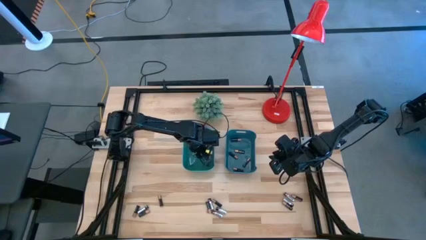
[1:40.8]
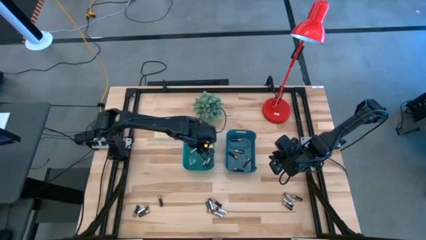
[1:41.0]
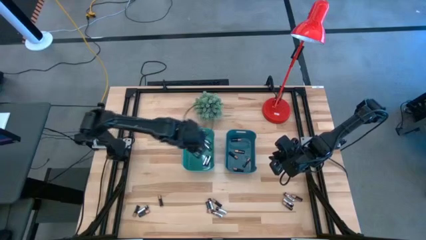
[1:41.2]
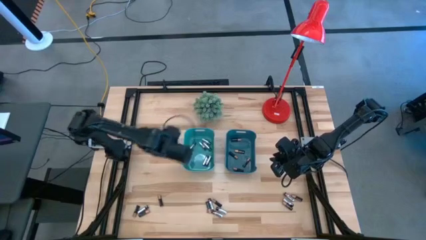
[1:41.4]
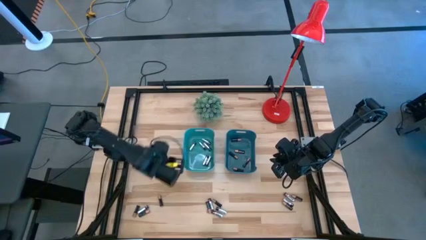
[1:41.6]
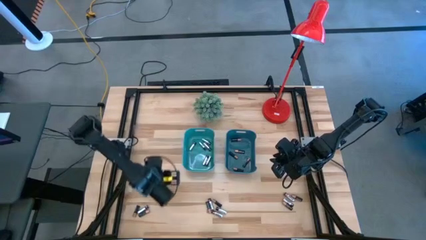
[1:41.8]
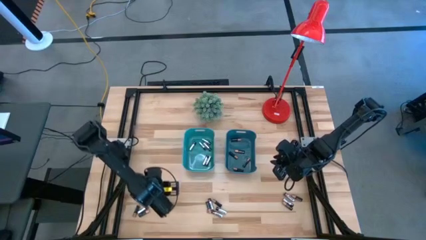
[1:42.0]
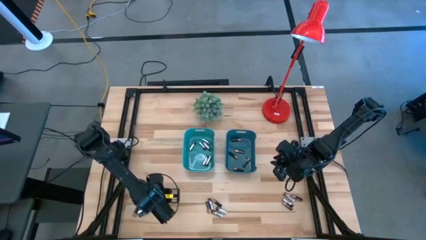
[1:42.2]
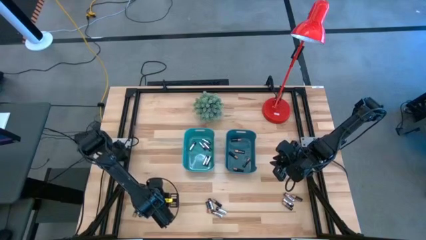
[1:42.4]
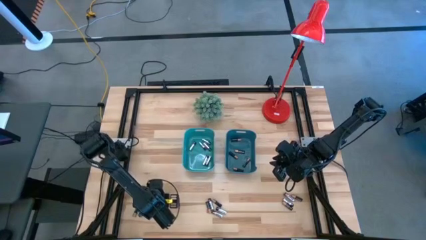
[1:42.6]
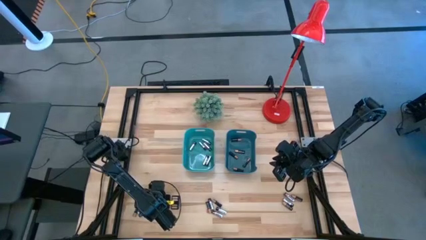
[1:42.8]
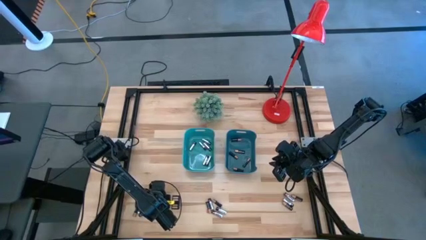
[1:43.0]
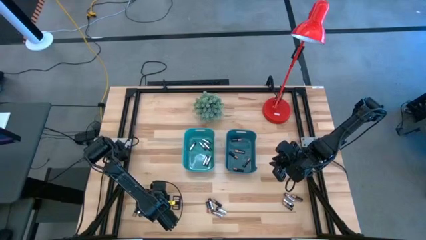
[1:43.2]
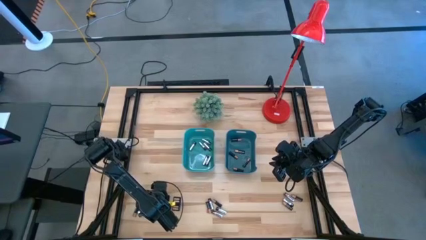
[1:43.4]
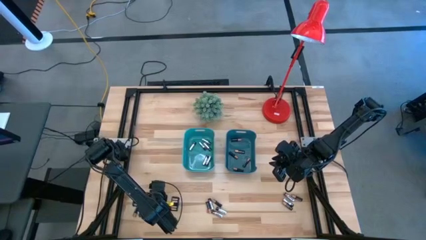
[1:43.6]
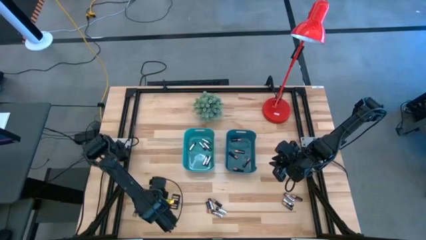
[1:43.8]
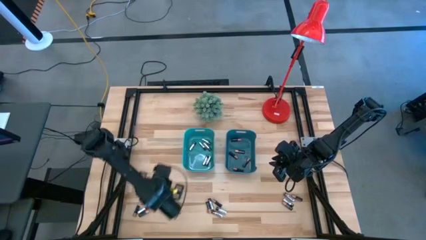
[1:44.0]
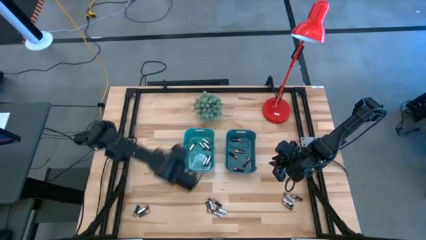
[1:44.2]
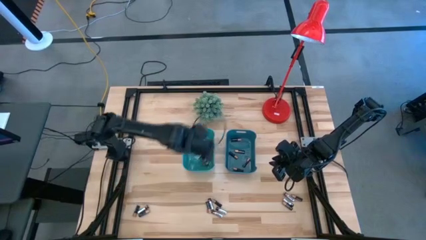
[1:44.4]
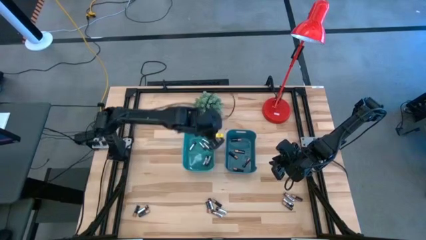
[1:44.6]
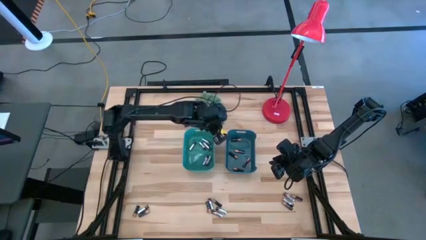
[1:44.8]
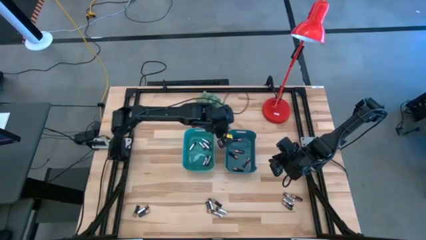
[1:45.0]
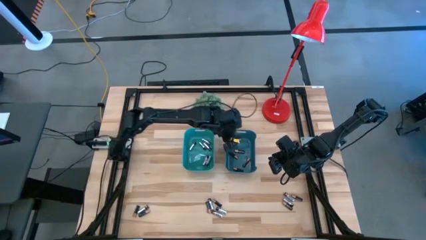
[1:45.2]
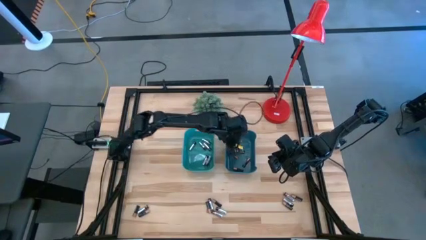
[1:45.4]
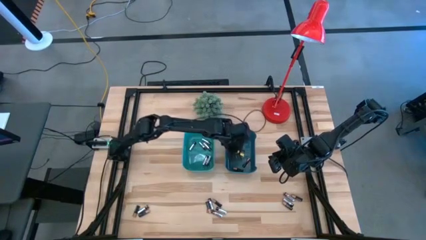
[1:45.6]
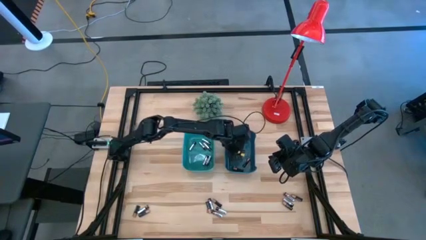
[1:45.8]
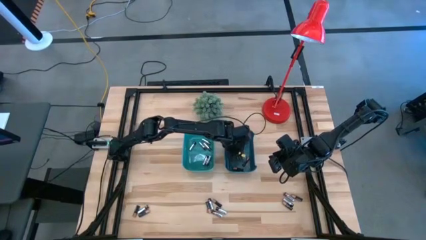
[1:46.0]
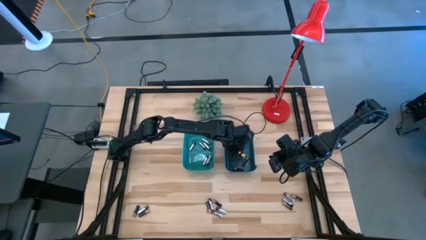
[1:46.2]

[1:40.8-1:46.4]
Task: Sort batteries
Put the black battery into the blue bin

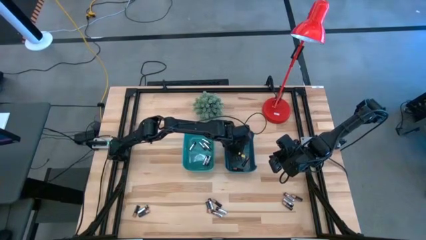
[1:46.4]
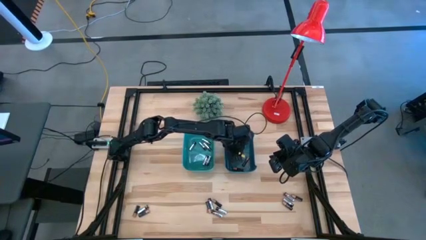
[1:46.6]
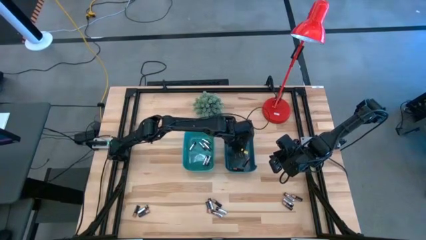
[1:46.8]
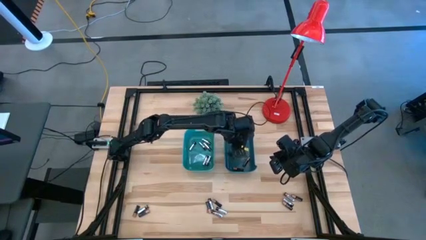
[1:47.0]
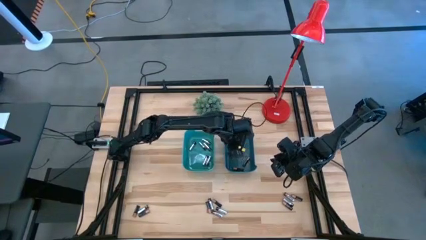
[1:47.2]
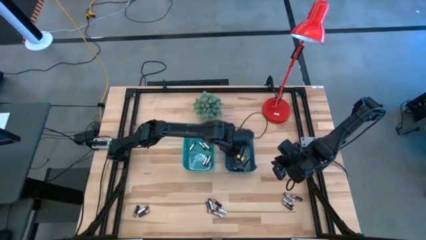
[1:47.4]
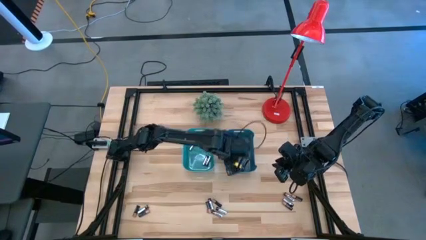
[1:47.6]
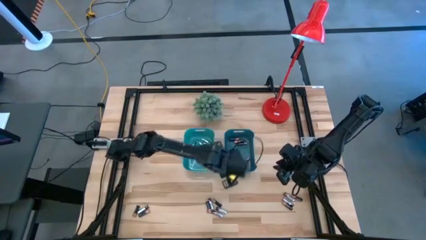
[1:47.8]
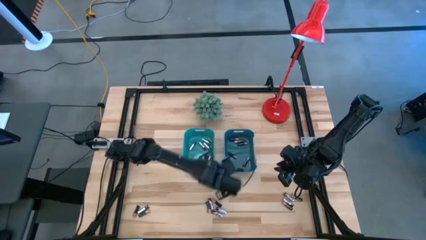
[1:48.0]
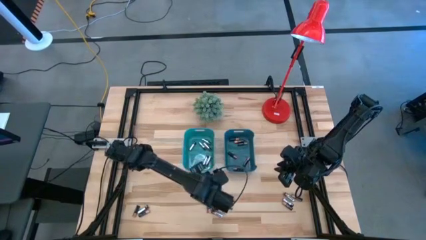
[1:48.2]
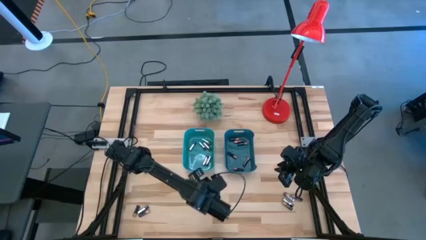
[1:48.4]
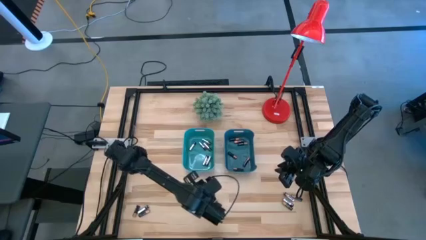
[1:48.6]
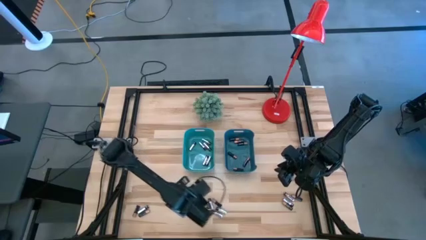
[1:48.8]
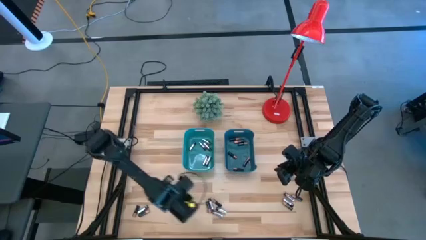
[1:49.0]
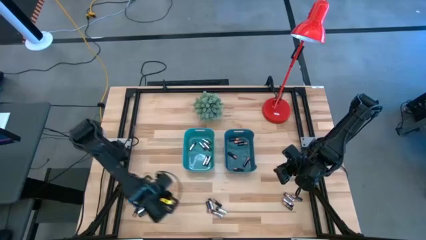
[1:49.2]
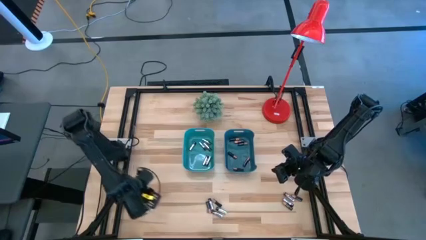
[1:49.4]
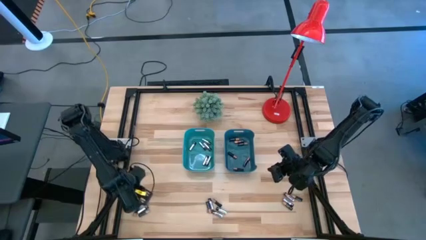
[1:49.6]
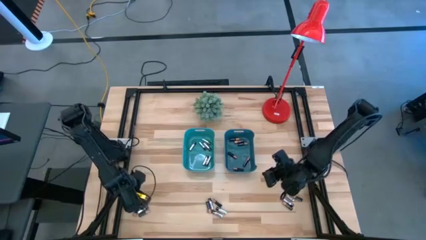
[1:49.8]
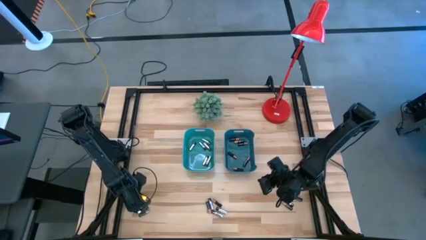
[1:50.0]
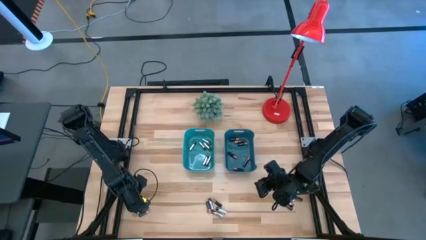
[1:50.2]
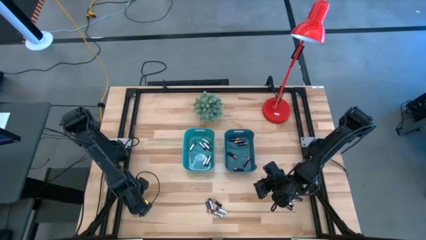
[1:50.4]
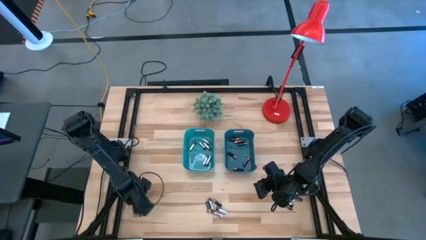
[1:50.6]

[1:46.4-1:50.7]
Put the black battery into the blue bin

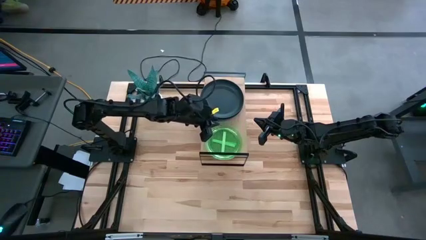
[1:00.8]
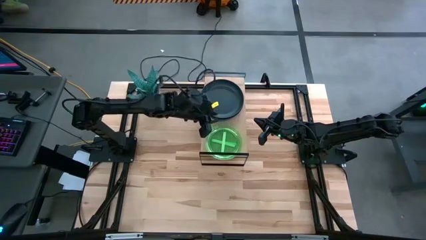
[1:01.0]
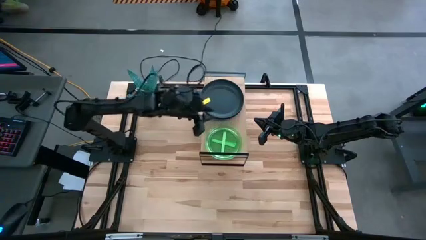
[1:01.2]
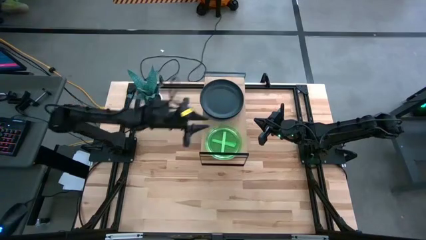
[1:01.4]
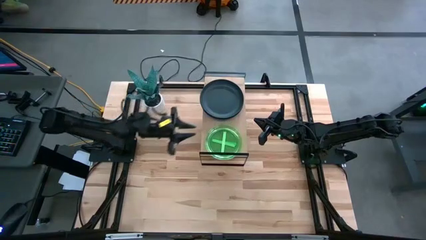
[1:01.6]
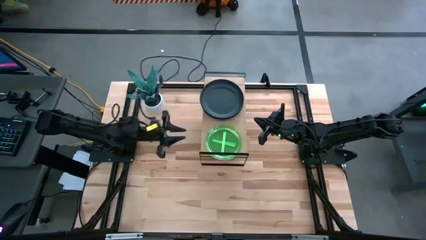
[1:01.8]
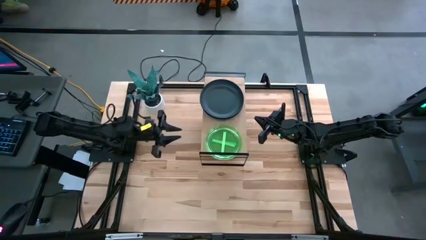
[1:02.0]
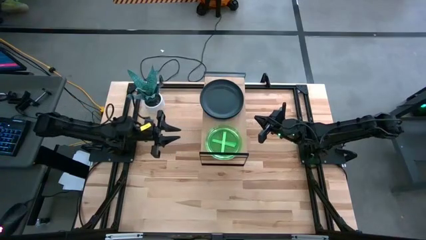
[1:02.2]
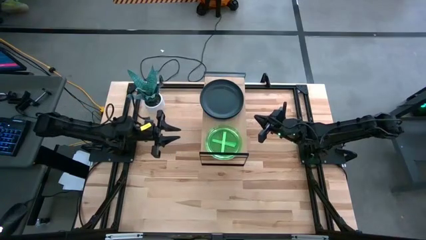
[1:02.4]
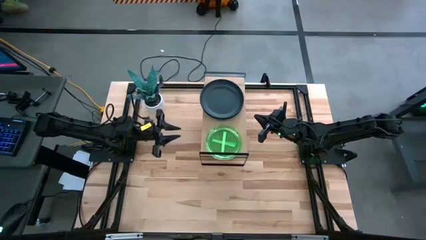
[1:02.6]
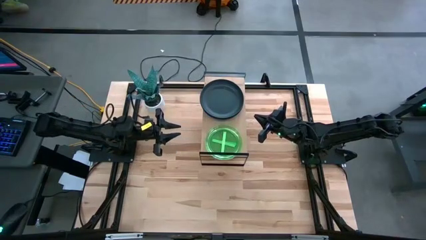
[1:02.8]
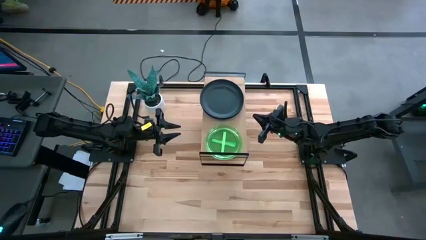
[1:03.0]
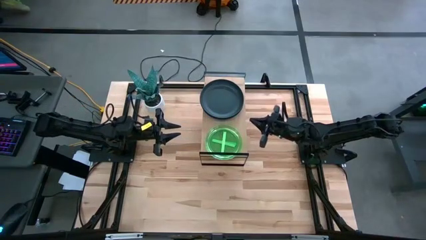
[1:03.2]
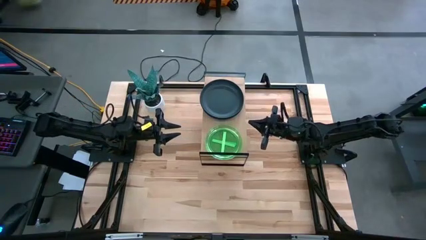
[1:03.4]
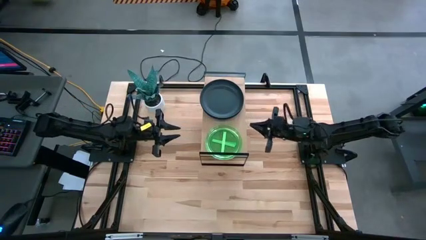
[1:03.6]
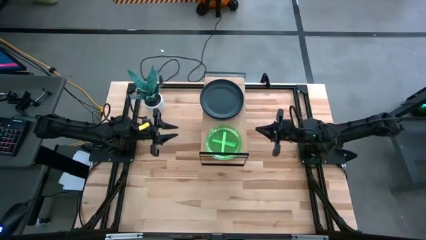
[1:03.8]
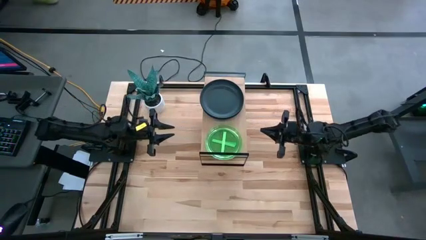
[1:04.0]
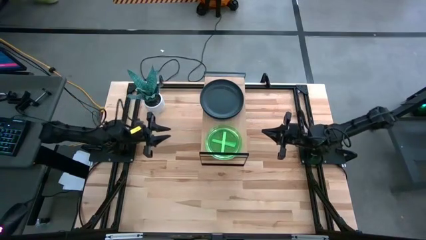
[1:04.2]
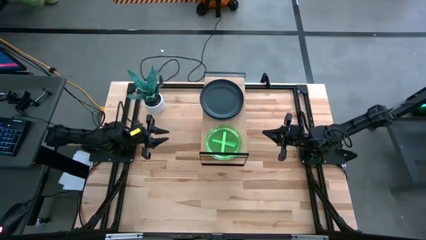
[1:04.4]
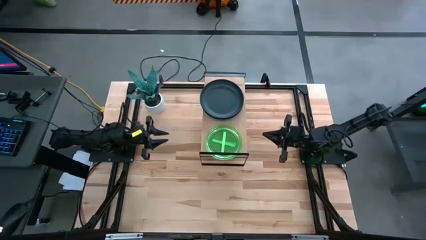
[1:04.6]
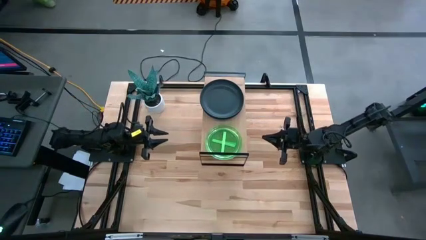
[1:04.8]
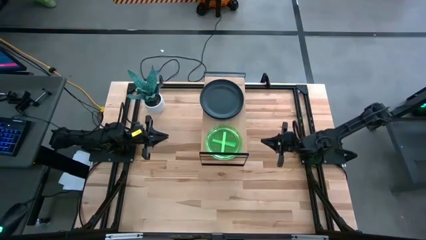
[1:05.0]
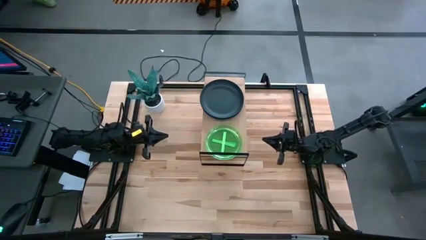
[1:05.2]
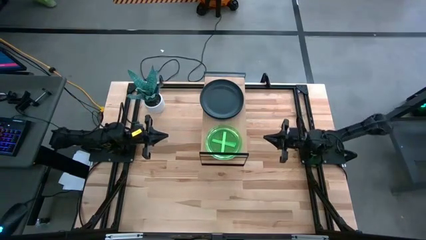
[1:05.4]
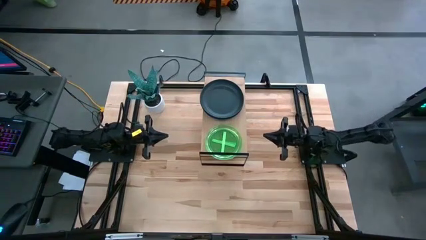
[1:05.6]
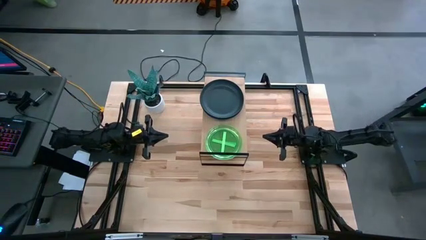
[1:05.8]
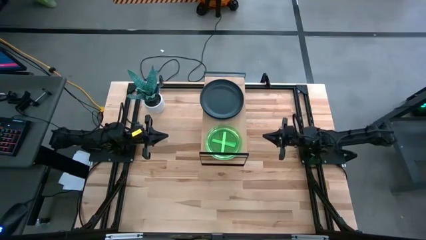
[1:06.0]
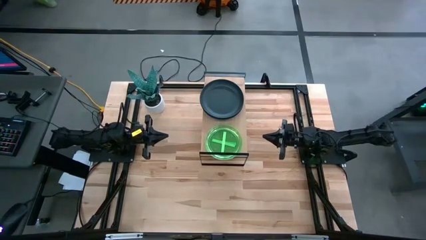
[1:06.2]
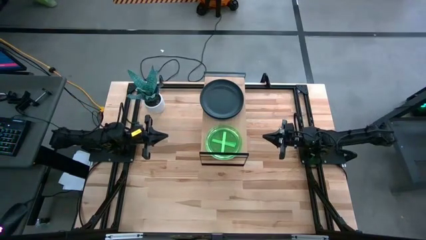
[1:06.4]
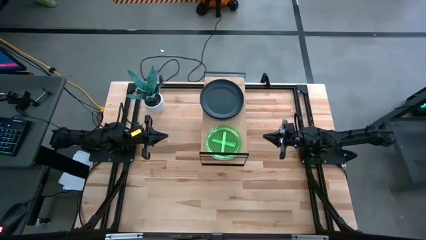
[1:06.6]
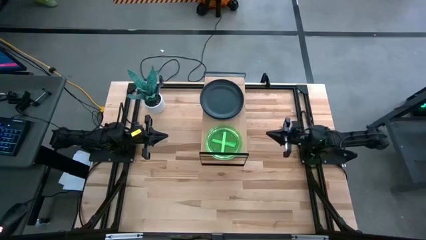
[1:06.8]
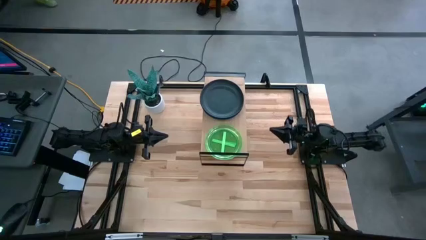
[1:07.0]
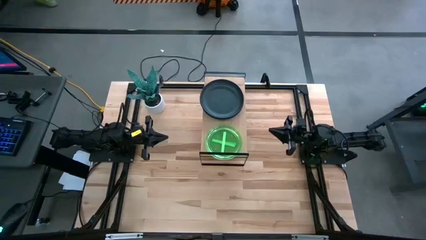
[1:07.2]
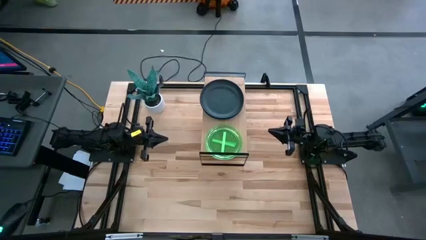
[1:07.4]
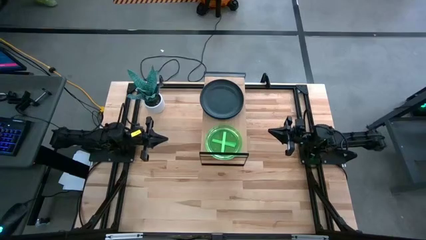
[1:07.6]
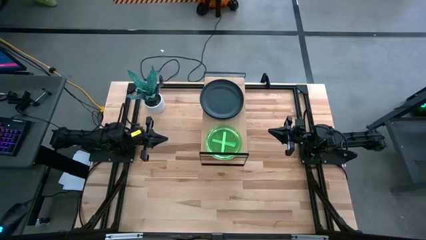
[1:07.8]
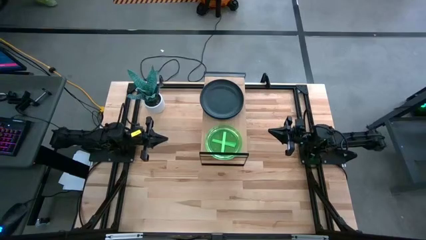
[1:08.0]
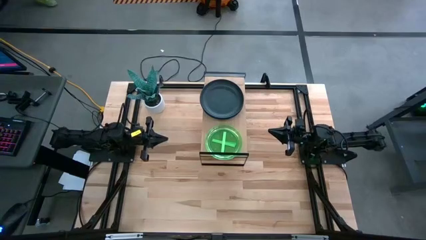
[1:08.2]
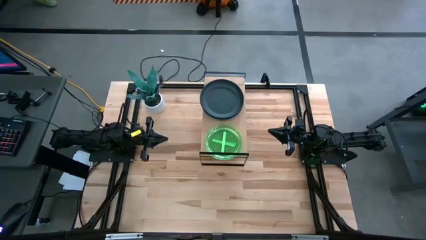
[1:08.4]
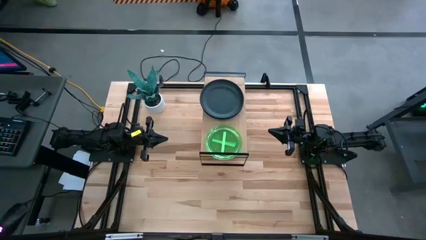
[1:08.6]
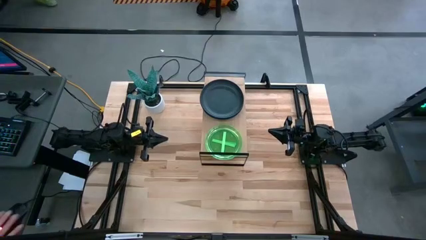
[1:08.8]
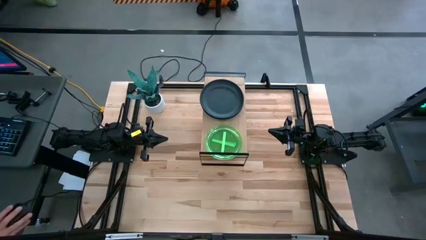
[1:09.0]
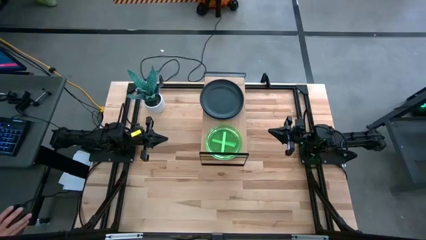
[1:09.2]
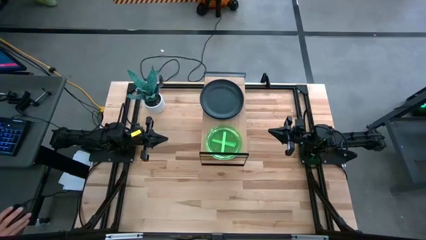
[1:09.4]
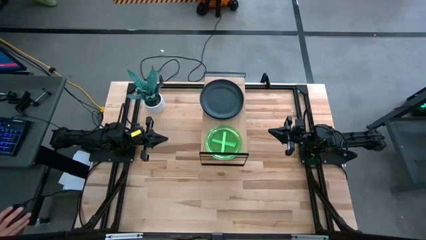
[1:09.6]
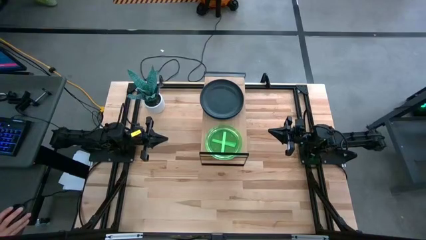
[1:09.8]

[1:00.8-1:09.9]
Task: Place and stack plates onto a shelf
Return to Home Position
